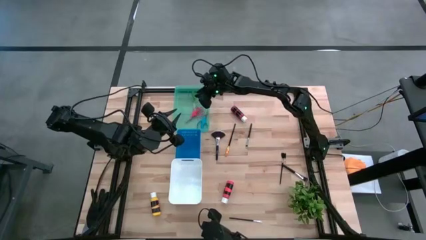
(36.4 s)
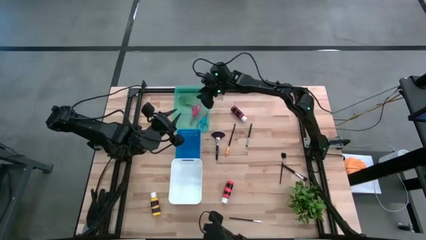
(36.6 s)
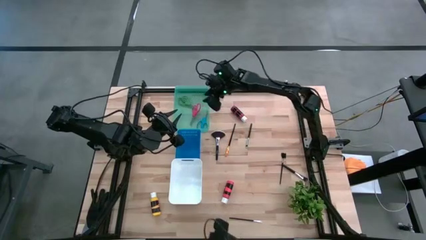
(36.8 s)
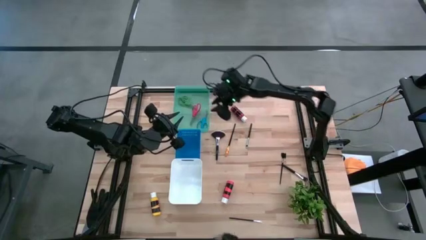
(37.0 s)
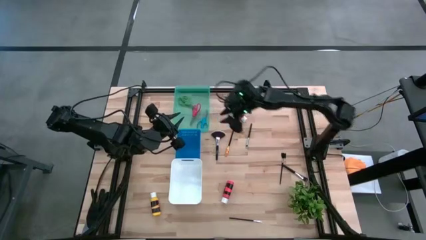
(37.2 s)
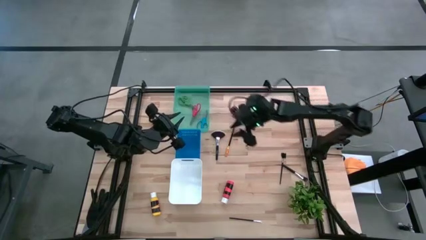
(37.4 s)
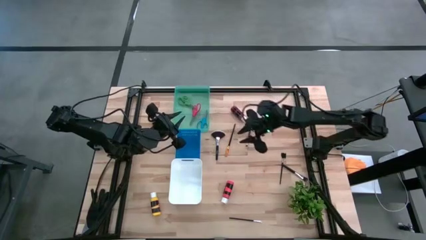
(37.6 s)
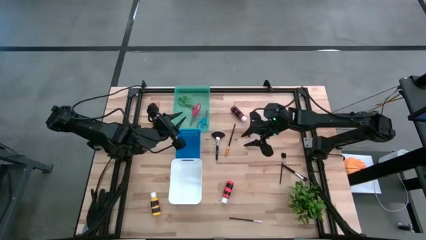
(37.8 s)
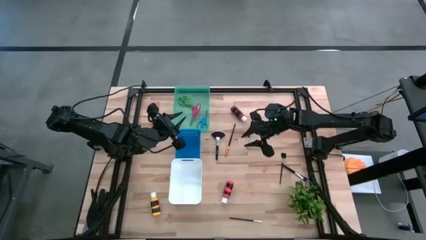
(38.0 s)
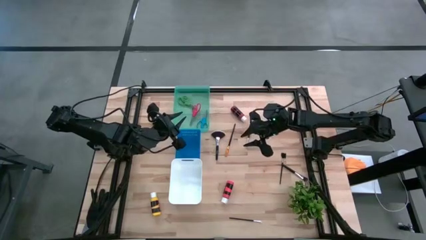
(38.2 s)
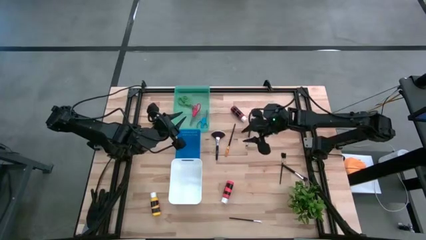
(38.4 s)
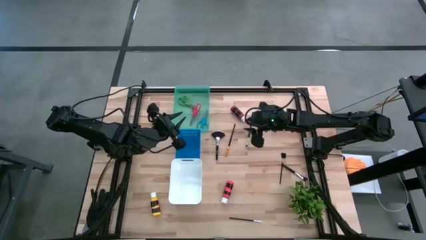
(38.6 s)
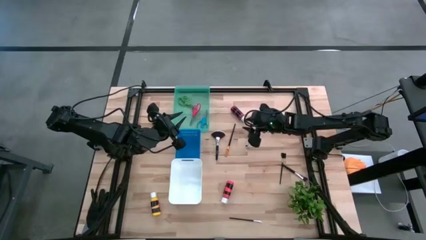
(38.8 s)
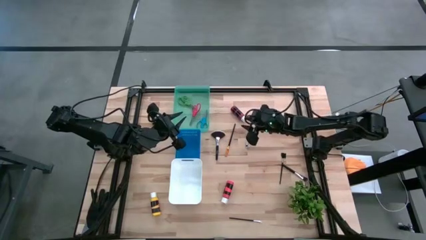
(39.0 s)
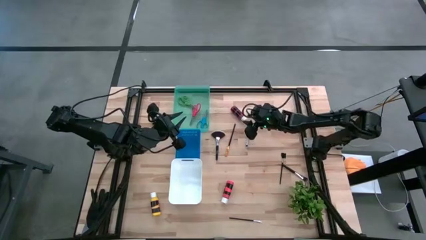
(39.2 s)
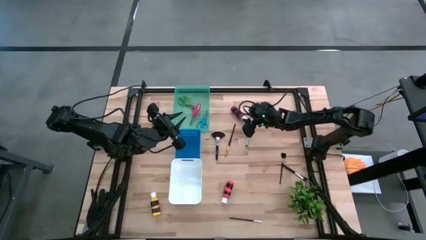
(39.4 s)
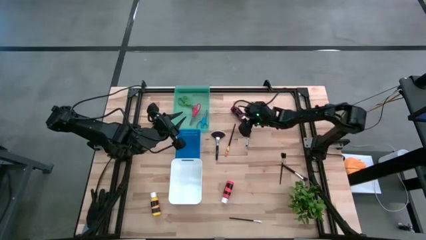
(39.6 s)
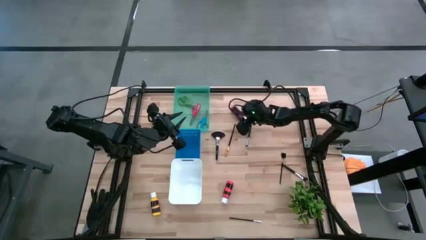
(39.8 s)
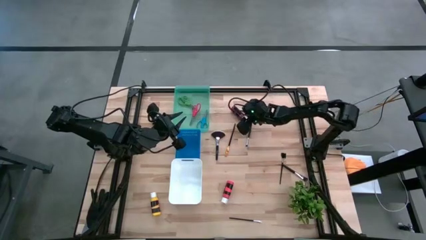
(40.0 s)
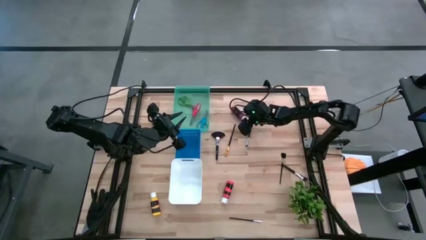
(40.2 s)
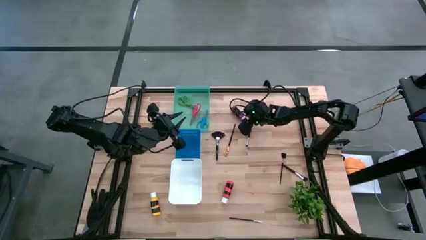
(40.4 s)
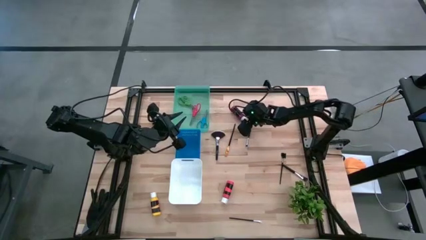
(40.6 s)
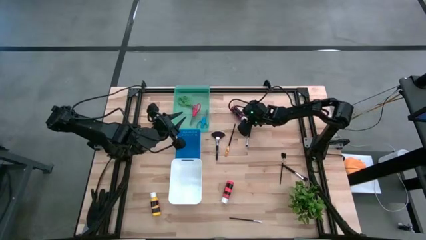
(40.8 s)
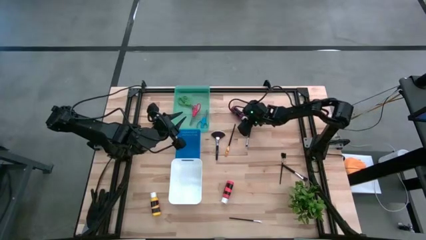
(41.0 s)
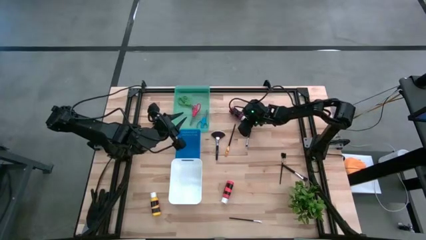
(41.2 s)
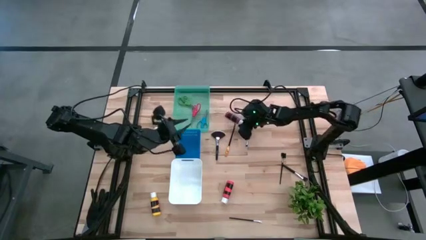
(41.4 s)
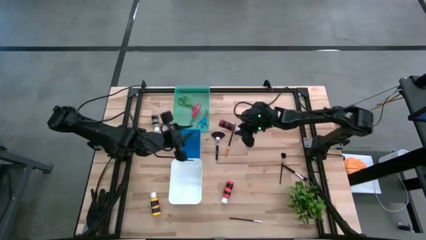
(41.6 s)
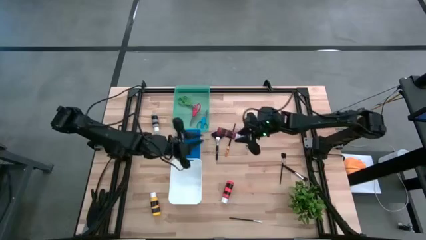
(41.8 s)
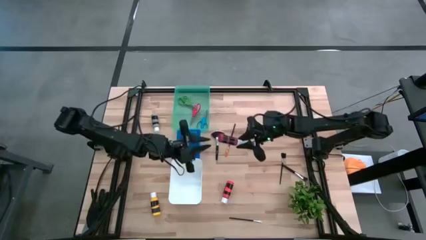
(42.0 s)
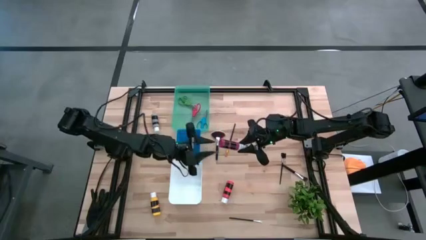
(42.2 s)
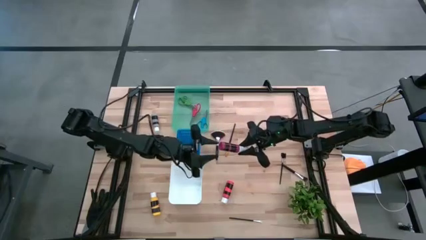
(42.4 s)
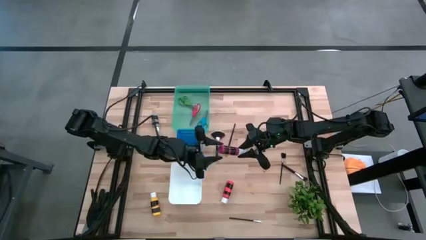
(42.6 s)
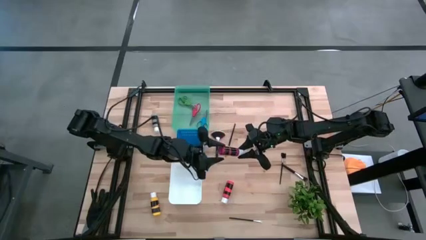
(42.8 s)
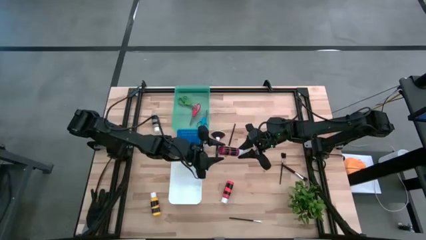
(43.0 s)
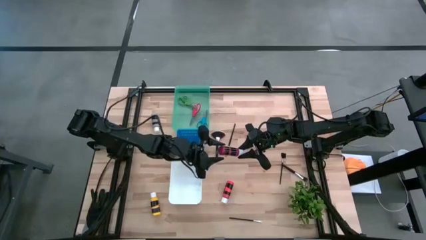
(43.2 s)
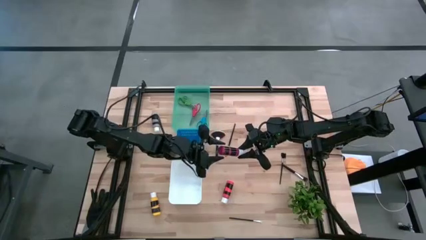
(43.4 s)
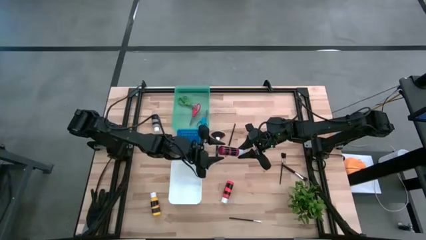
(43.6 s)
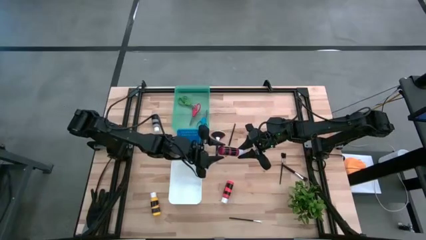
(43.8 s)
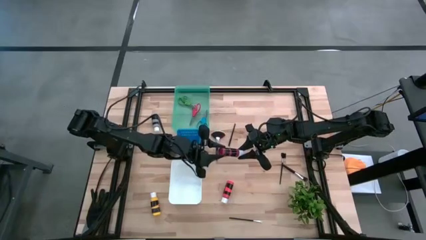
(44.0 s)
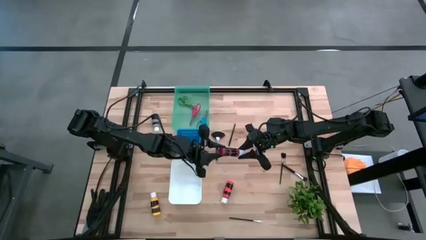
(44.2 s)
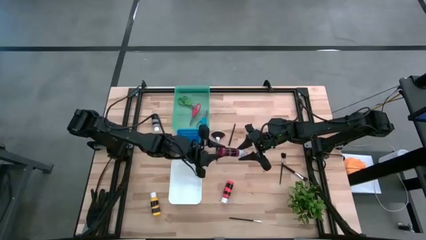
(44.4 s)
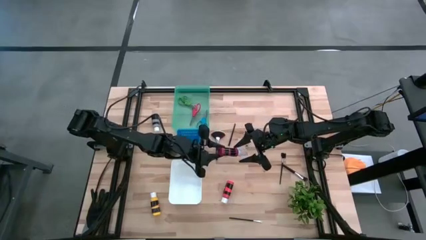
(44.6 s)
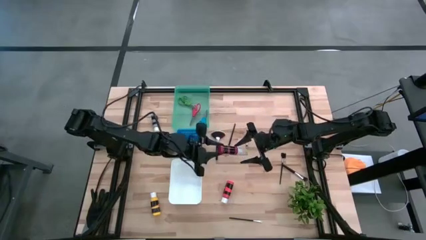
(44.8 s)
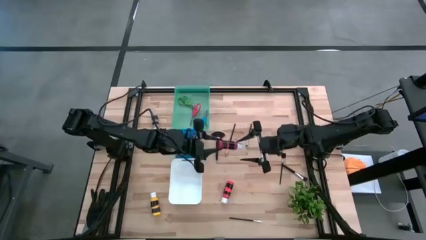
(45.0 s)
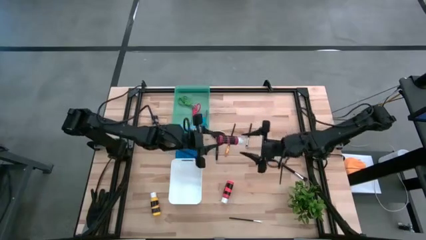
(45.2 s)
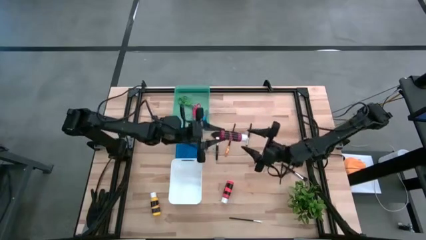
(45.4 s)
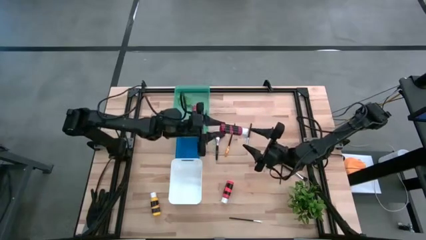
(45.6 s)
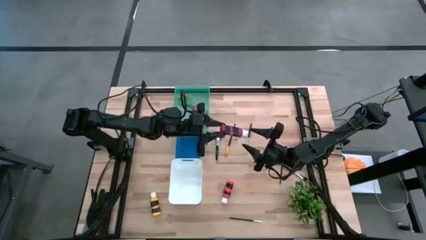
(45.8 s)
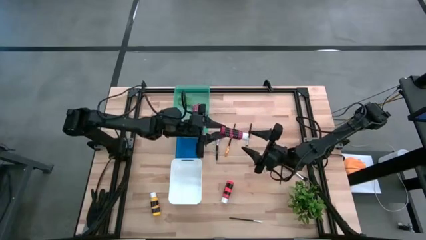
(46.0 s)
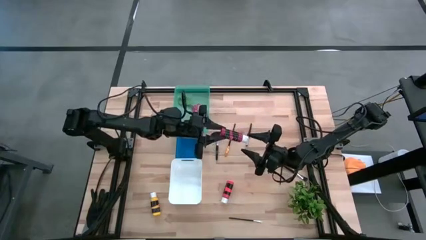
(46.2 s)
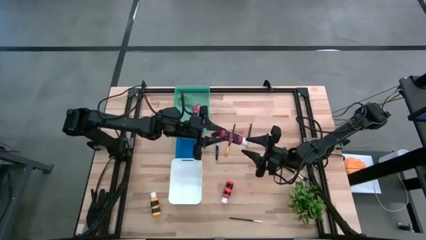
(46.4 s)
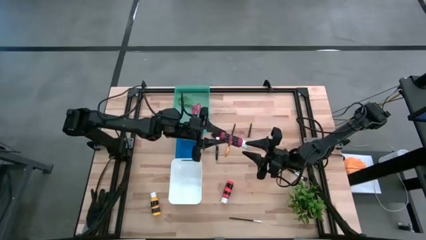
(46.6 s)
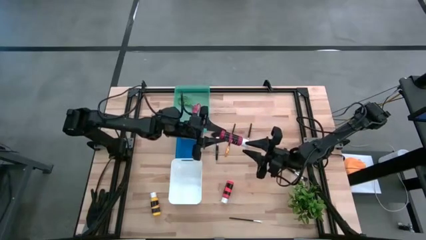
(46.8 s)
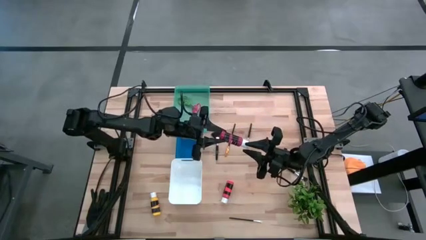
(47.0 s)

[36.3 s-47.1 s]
Task: Pick & Place Paint Supplies
Put the red paint bottle into the blue bin
